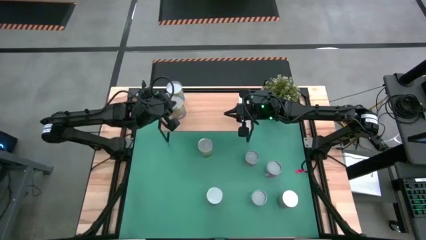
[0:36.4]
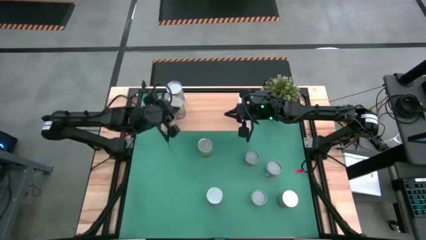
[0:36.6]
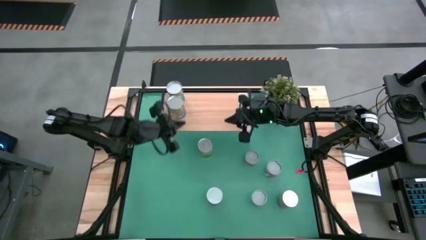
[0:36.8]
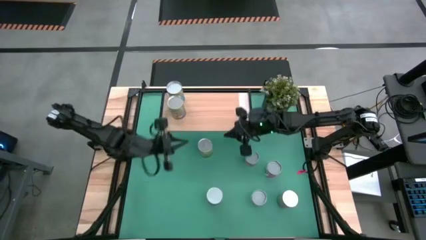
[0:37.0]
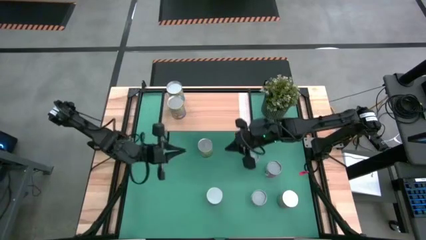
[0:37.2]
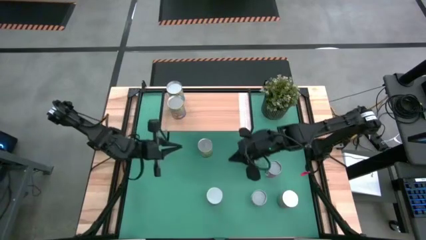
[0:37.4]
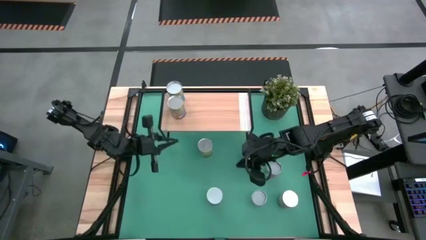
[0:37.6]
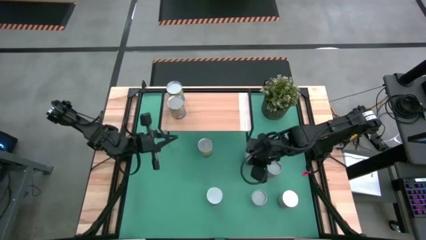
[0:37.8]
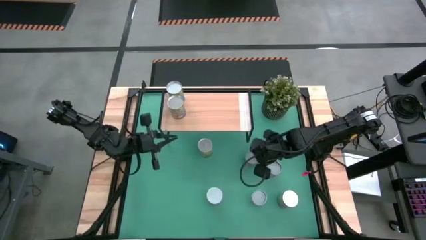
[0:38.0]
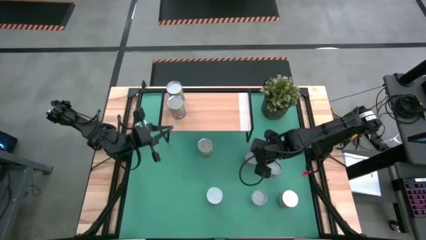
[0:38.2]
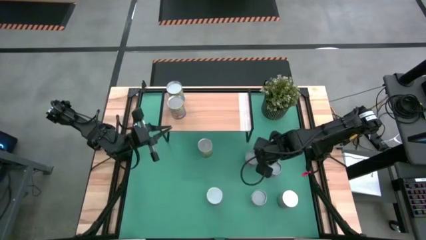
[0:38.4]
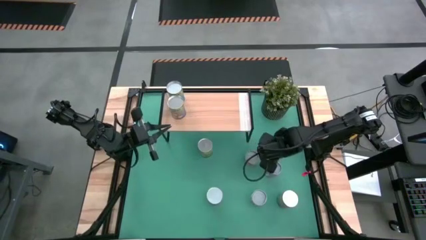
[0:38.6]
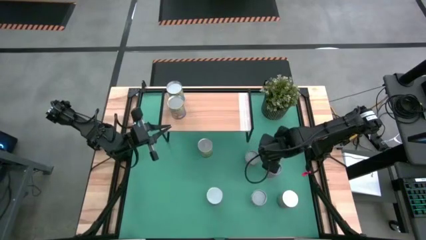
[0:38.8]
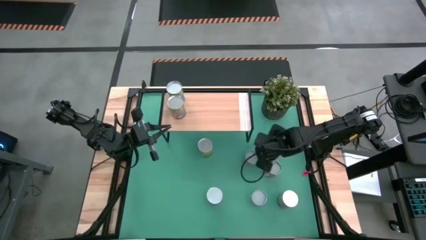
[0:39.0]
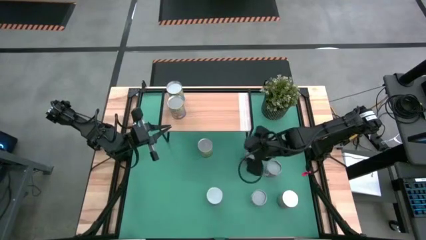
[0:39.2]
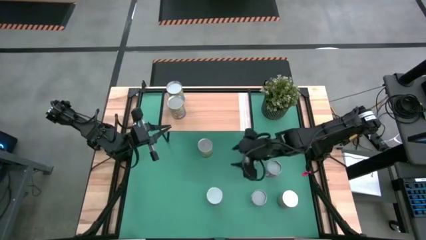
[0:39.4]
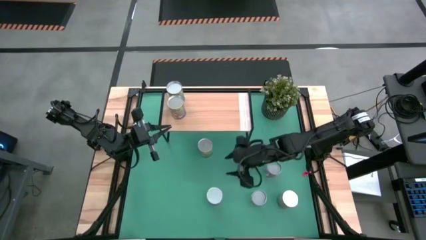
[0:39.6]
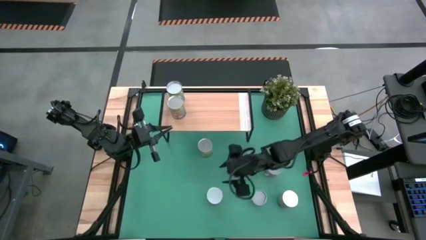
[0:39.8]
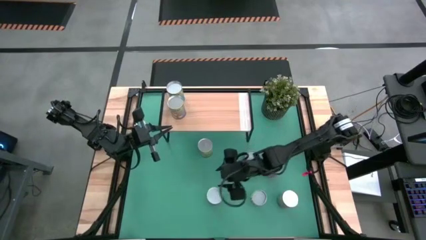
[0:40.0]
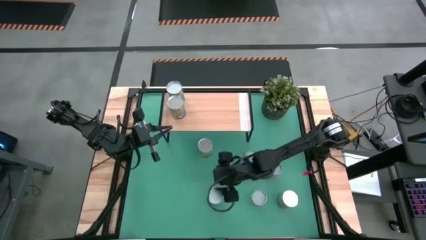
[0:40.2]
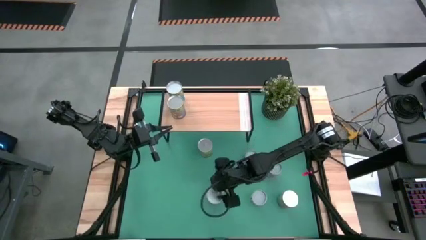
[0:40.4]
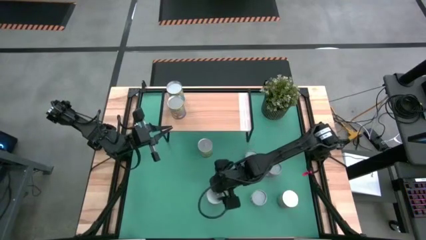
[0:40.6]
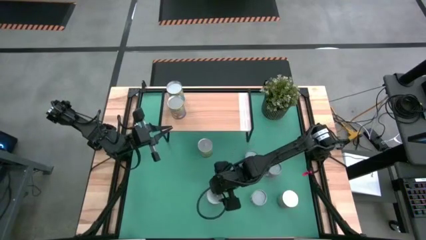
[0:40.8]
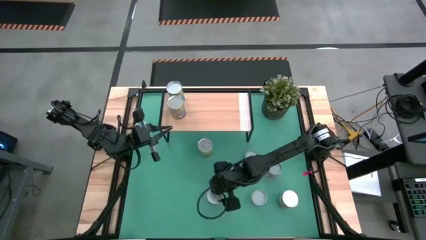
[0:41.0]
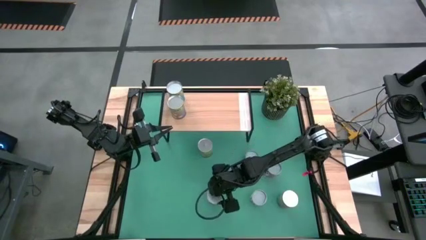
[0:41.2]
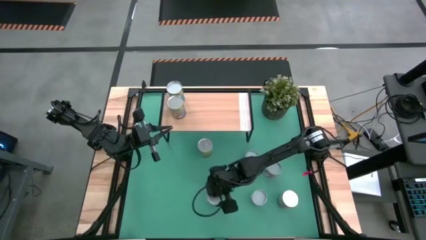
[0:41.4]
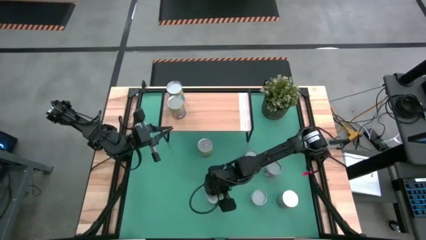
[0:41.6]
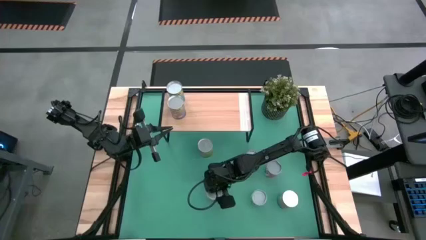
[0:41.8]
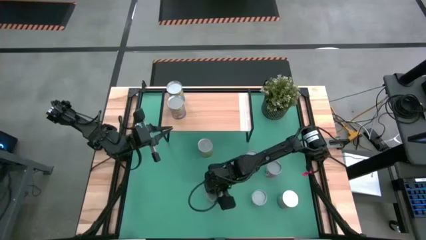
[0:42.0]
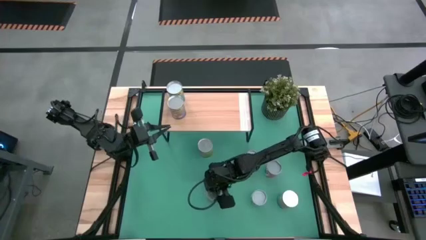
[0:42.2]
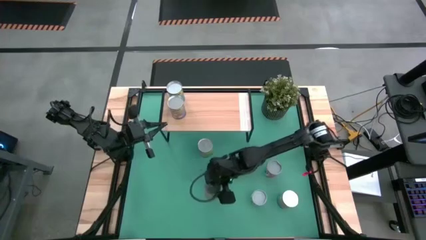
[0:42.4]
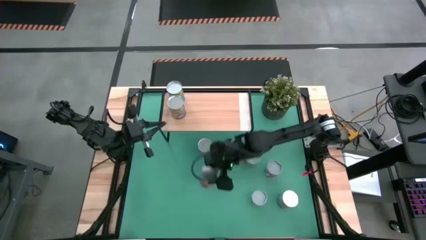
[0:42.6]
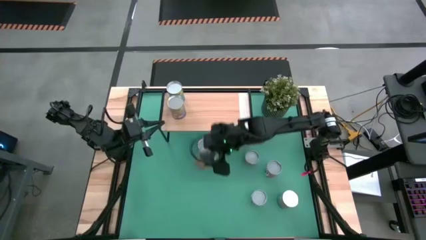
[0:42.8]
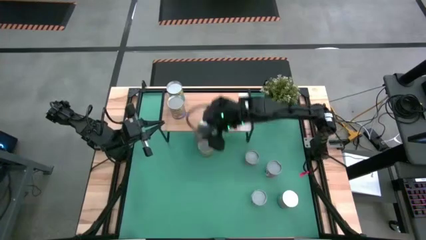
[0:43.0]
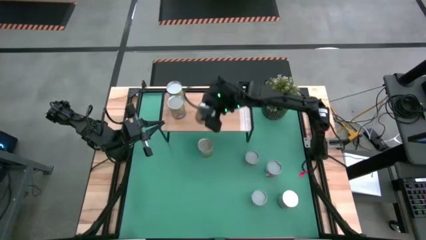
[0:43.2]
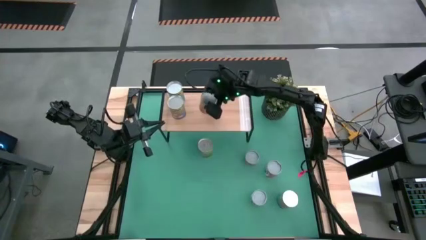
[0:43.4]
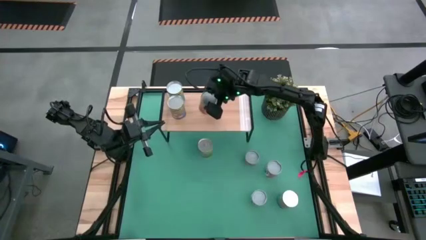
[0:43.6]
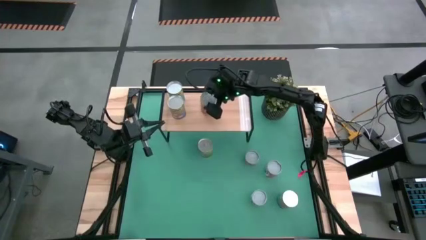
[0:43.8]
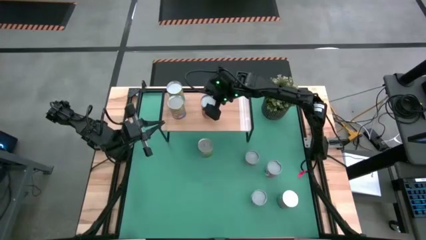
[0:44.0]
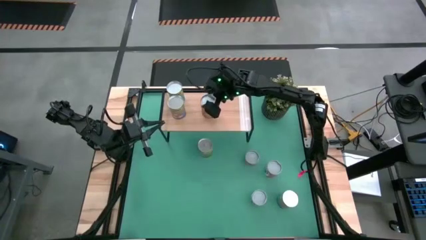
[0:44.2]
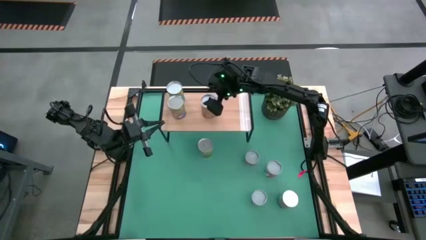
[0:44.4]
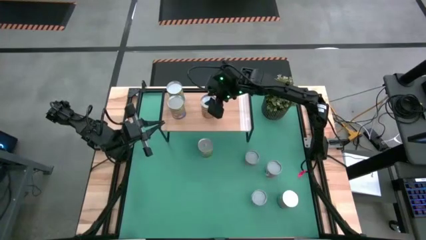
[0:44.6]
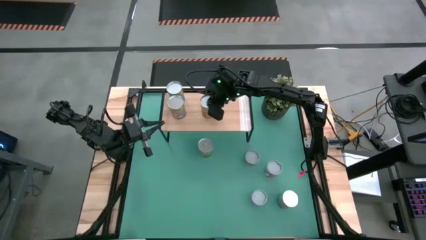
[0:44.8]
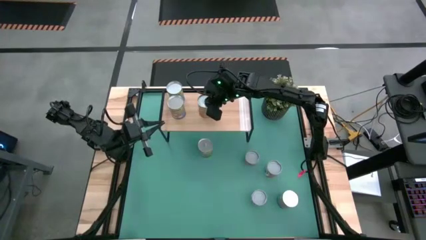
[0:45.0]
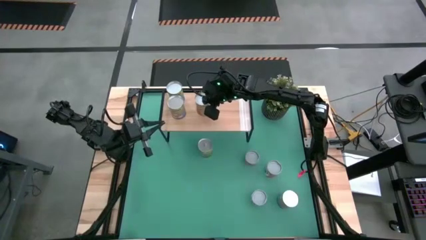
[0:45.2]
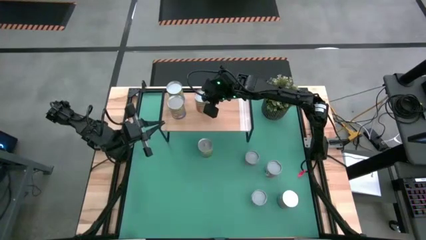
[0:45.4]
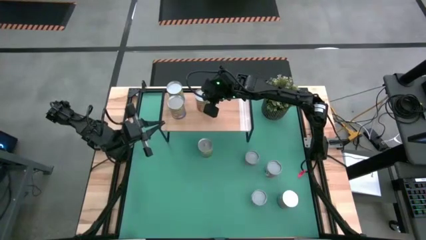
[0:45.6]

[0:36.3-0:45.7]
Task: Pick and place cans onto a shelf
Put the canned pineapple on the shelf

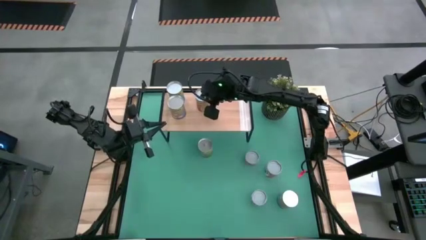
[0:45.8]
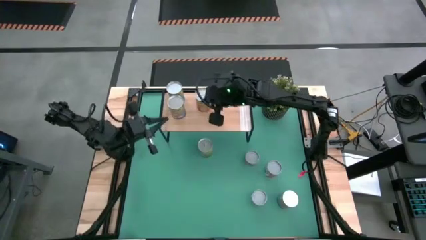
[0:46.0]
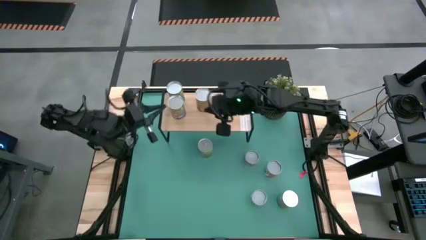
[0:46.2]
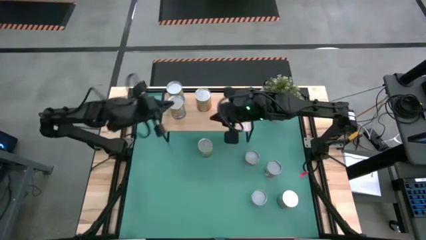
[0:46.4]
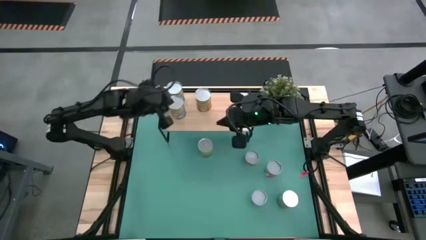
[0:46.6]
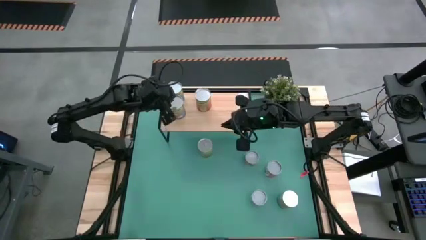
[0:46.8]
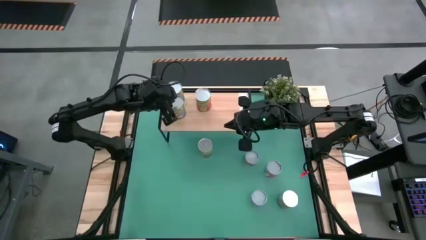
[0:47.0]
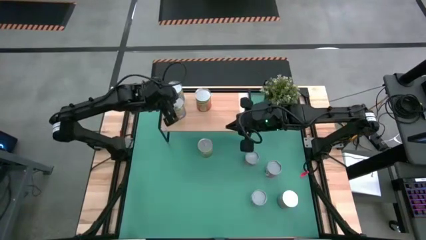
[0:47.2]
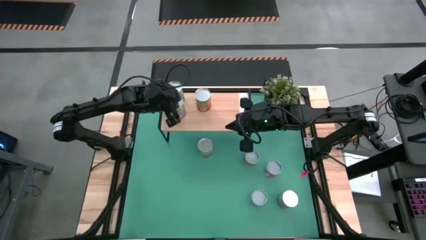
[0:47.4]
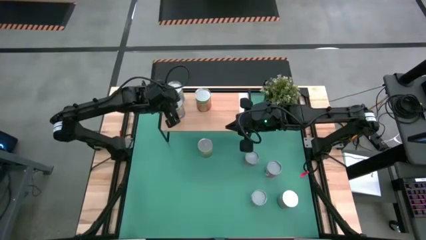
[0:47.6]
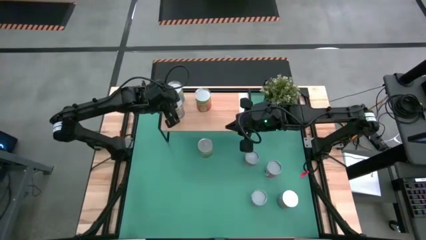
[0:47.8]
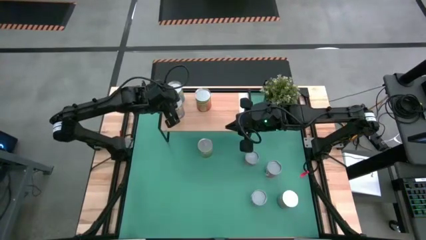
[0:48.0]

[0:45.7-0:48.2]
Adjust the canned peaches

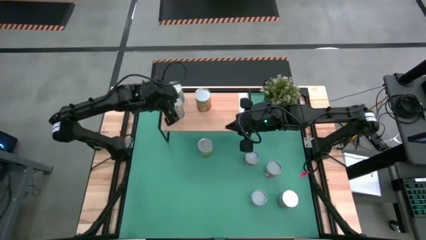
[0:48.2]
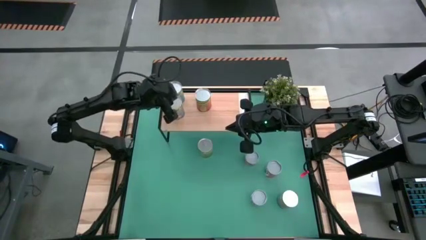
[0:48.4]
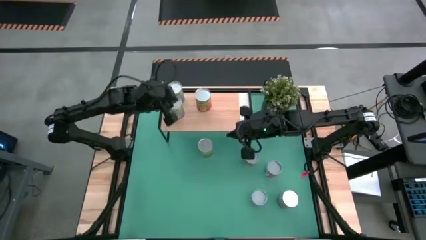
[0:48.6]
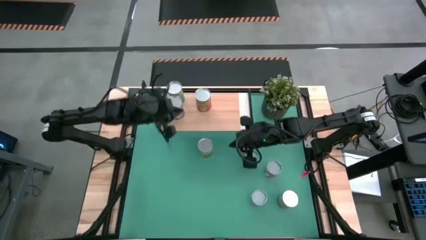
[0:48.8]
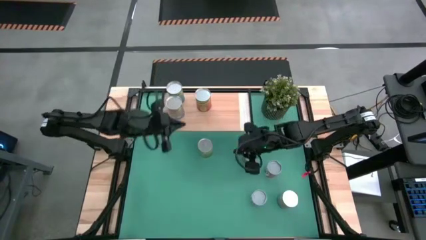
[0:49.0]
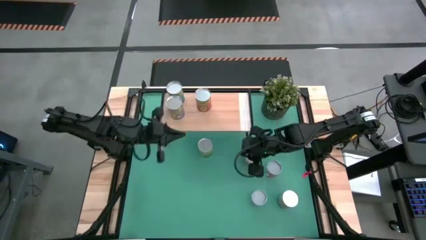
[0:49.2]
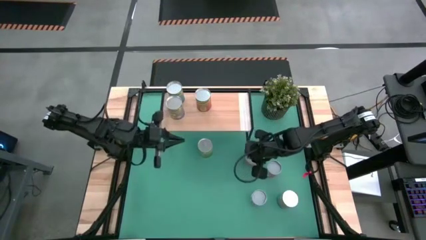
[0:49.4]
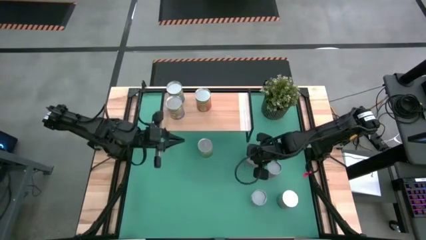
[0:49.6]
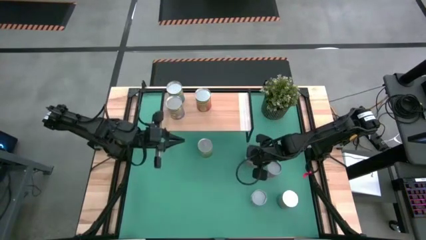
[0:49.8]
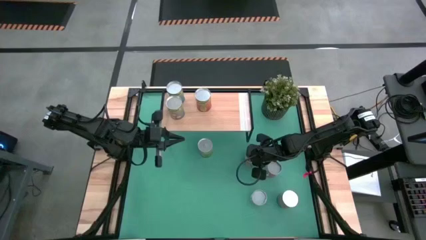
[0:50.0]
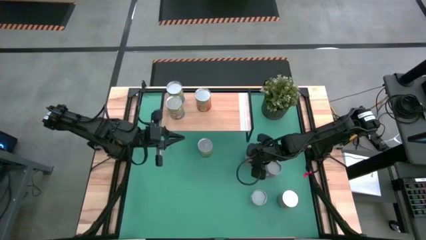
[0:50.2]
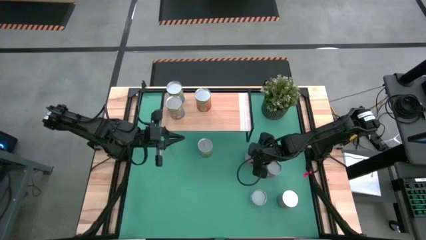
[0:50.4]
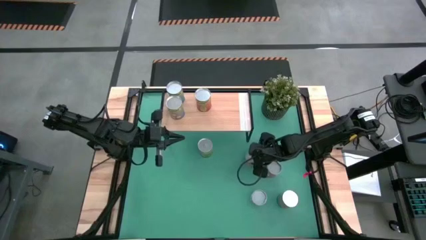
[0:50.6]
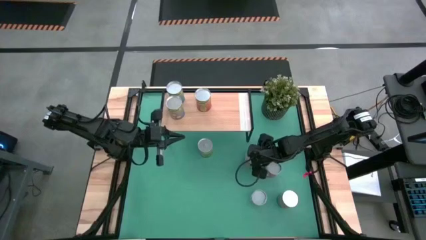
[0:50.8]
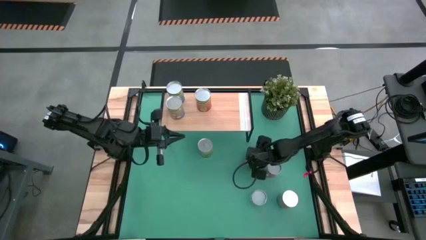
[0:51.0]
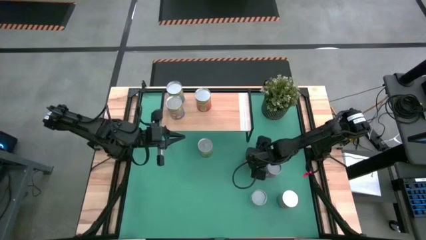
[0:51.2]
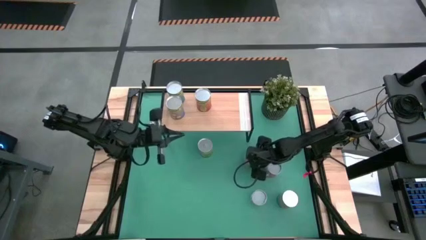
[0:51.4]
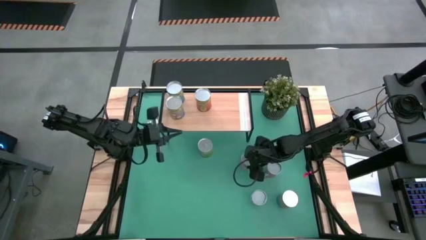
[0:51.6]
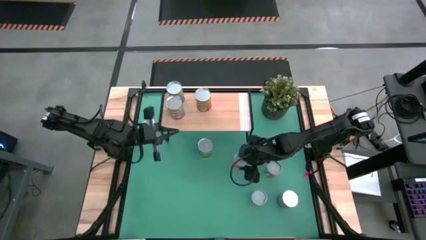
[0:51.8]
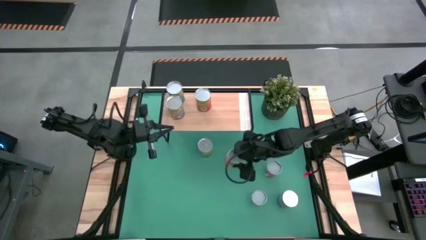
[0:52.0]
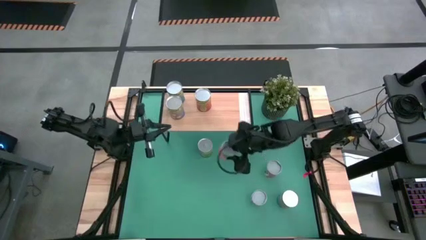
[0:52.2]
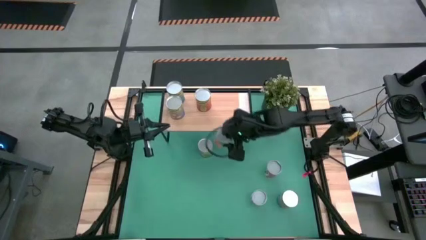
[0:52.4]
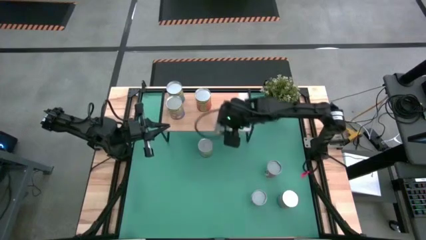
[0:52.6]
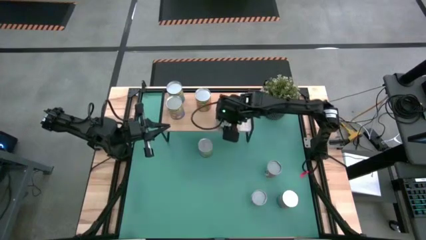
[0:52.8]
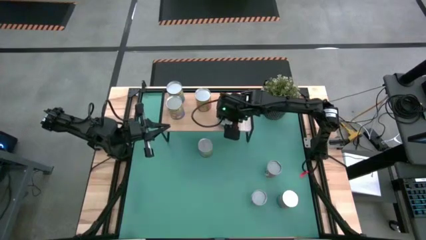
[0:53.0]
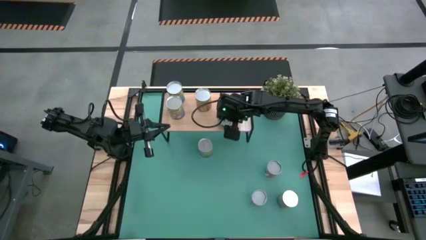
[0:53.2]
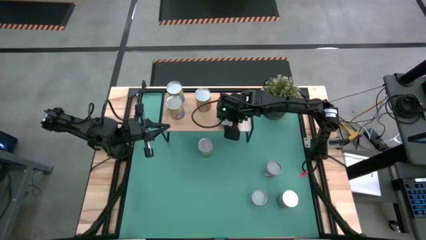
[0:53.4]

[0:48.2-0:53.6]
Put the small canned oranges on the shelf

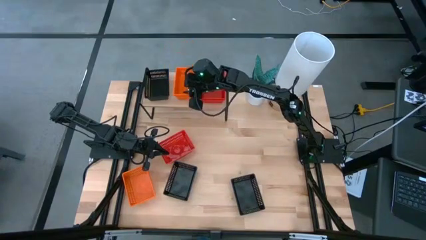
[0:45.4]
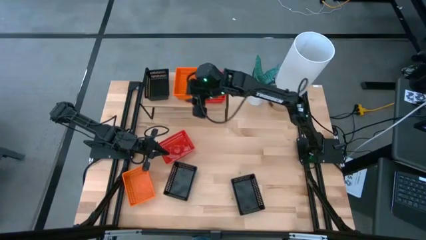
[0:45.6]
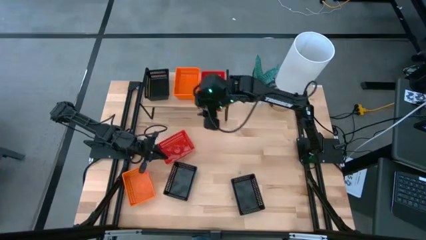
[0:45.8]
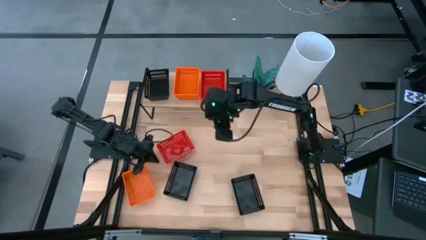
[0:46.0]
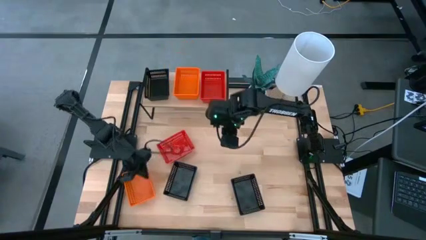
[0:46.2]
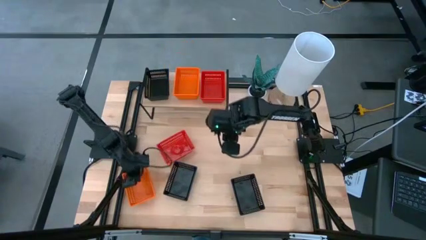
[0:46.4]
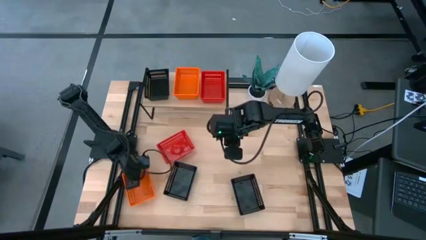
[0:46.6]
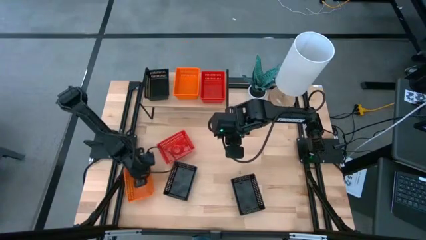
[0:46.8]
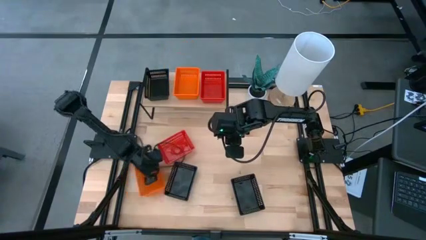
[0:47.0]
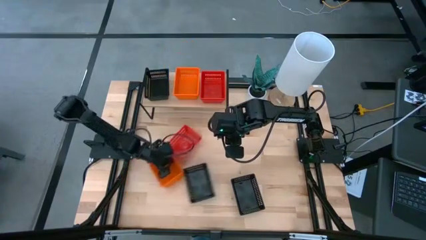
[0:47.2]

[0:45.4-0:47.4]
Task: Stack baskets on shelf by color
Move the orange bin to the middle left of the table
